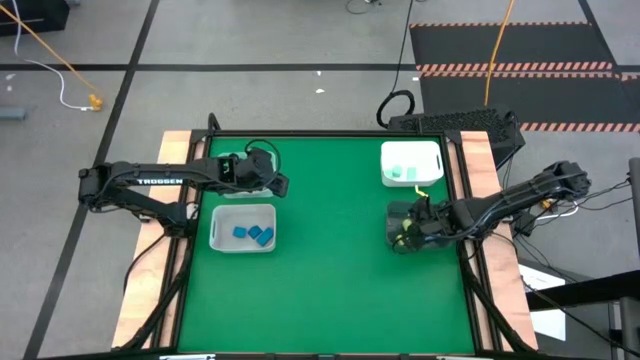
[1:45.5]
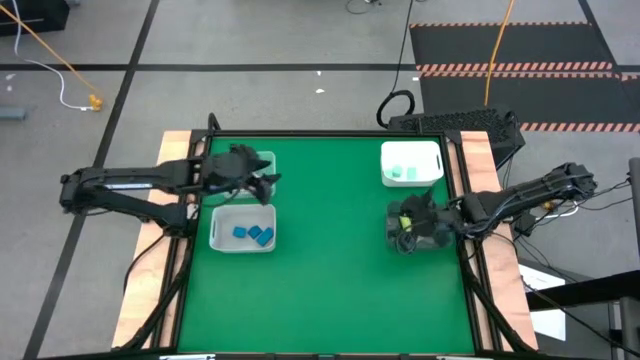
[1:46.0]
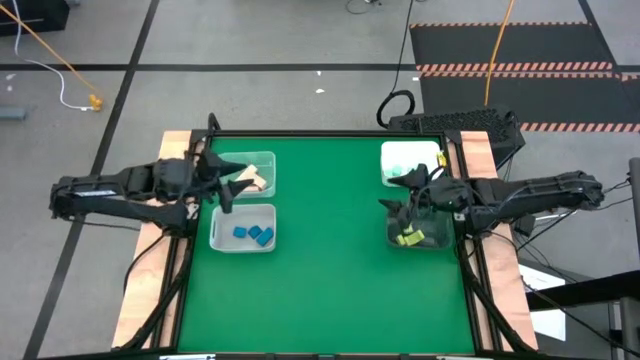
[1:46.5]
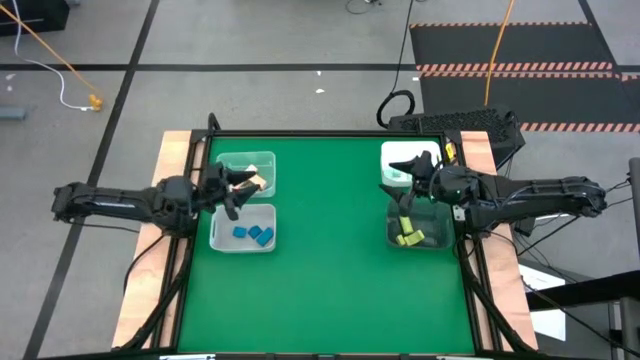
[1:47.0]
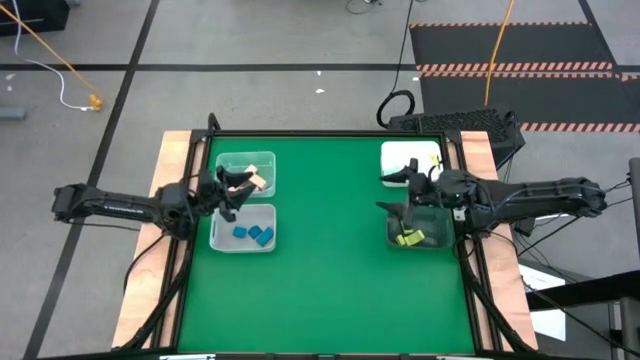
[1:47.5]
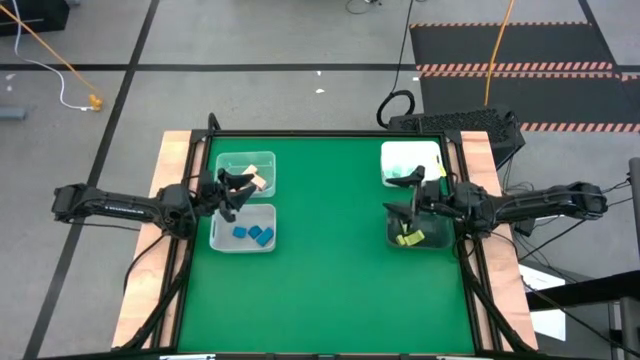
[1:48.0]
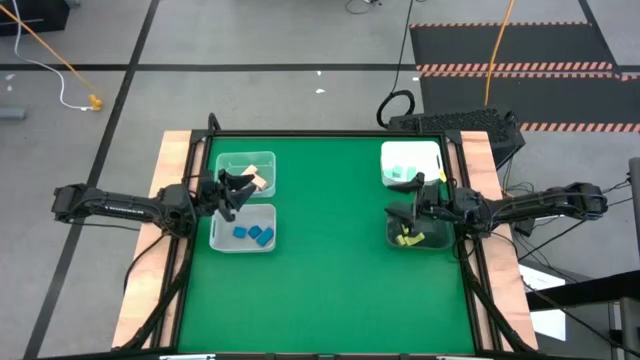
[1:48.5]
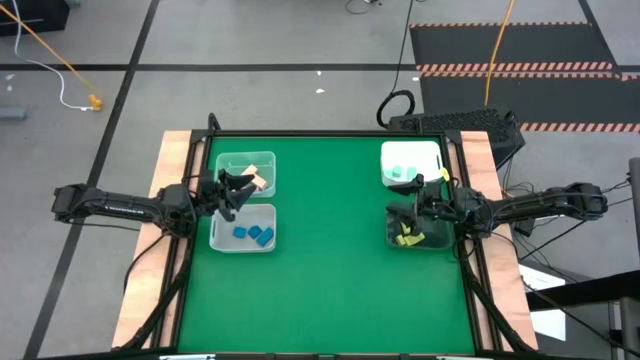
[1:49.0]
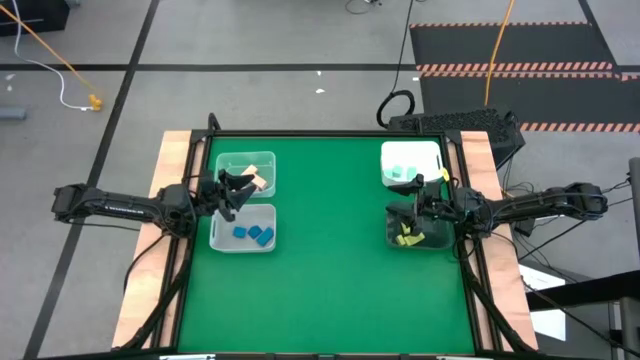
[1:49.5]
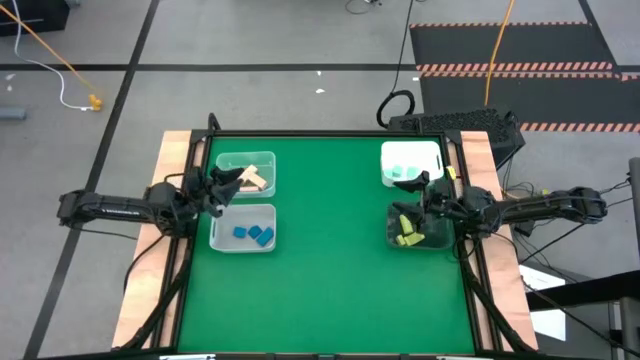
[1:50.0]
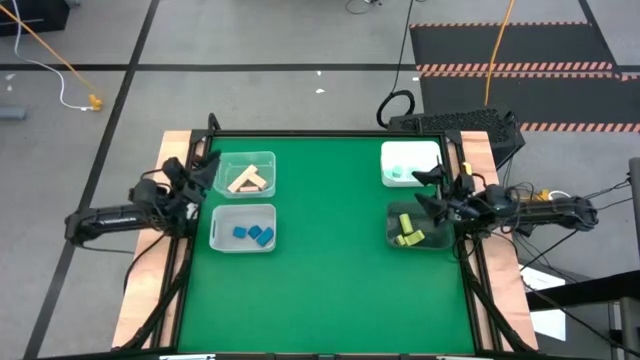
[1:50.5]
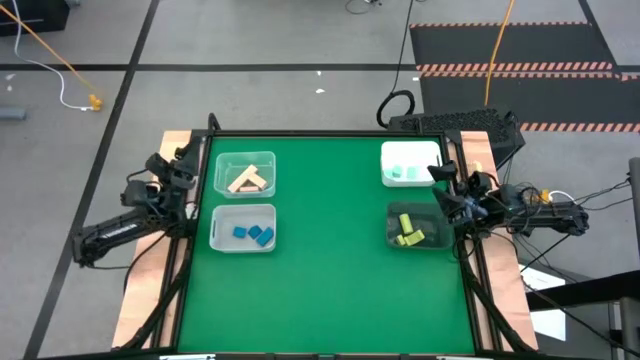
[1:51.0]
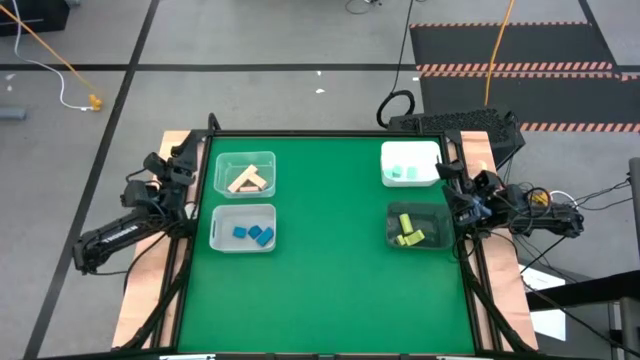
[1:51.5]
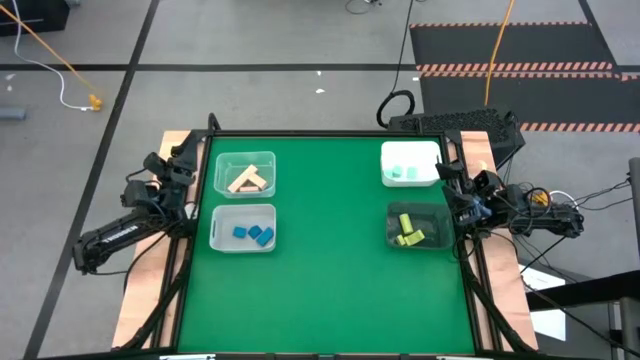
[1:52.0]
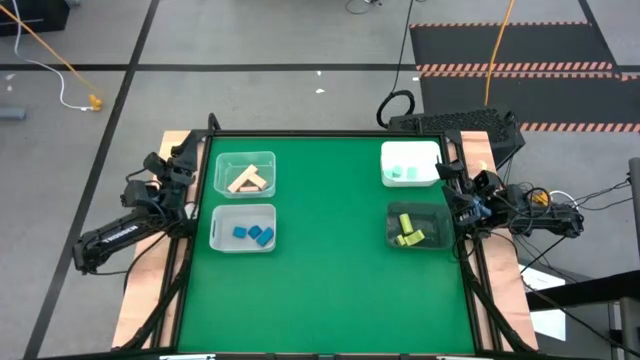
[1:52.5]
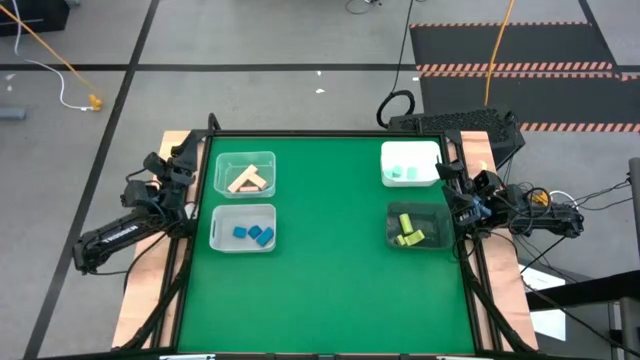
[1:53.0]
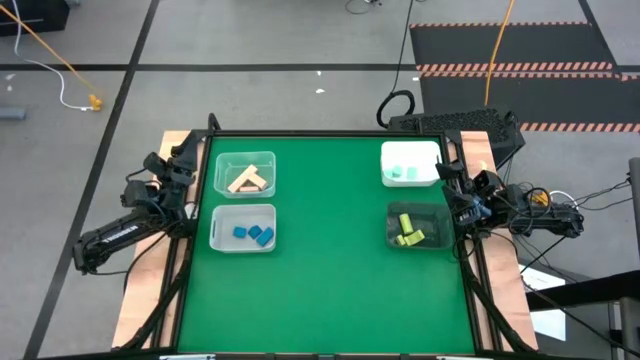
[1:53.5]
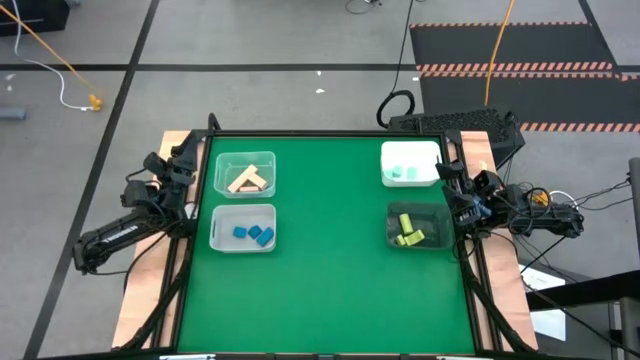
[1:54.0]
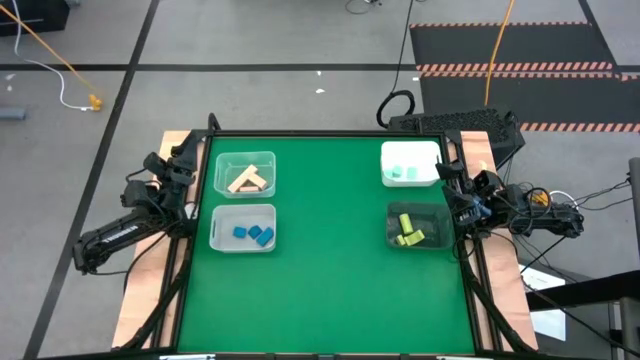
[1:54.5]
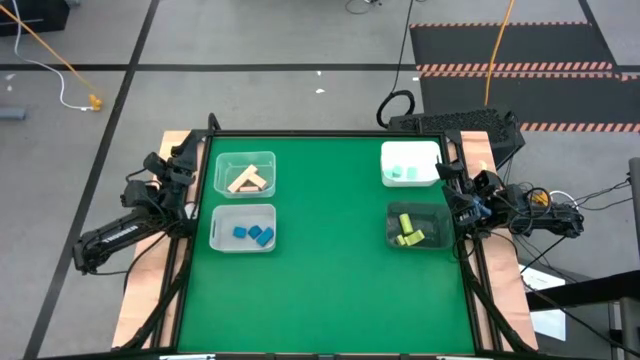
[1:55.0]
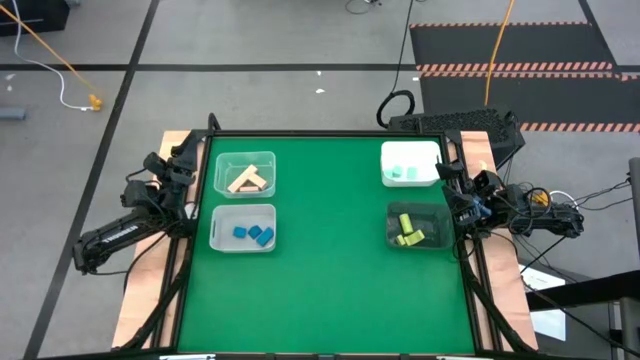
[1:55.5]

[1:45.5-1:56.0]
Task: Sort & place blocks by color
Return to Home Position
